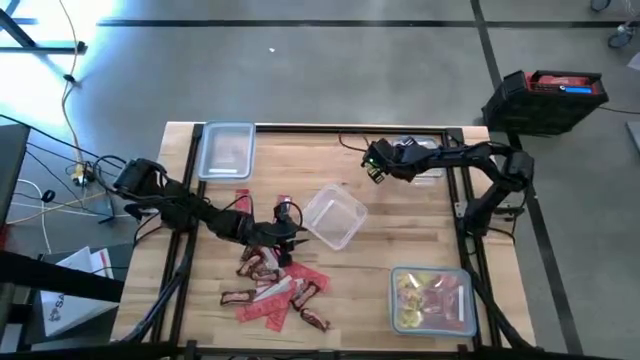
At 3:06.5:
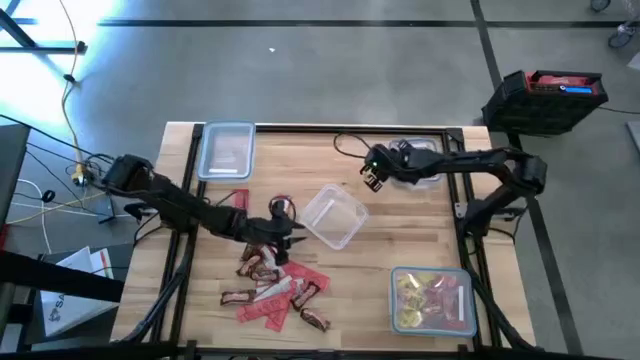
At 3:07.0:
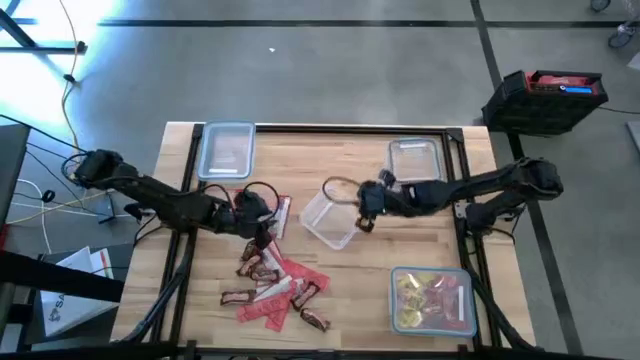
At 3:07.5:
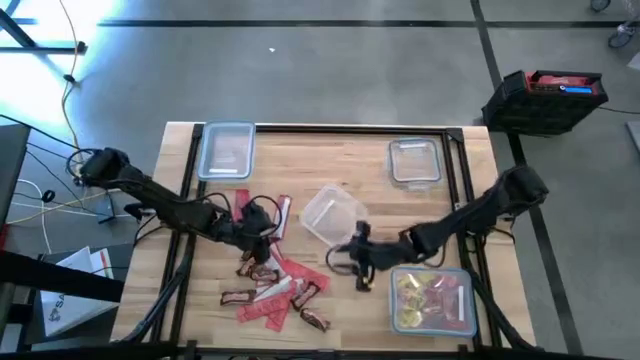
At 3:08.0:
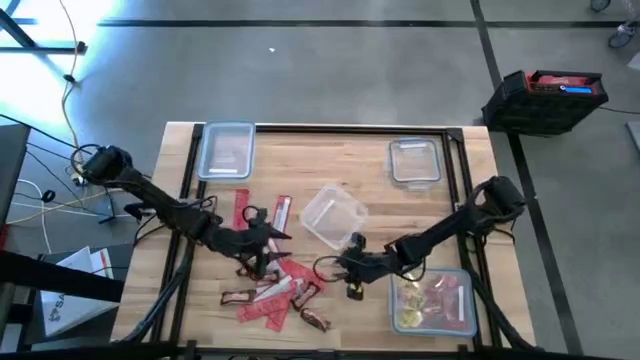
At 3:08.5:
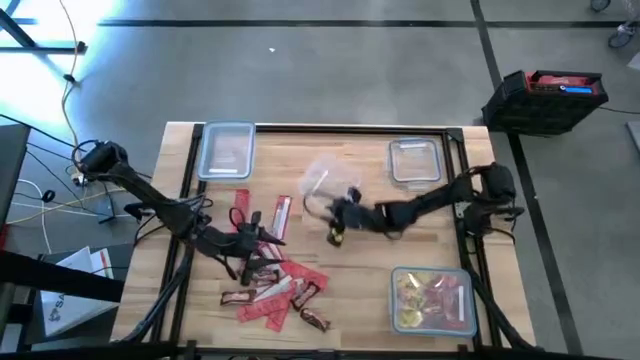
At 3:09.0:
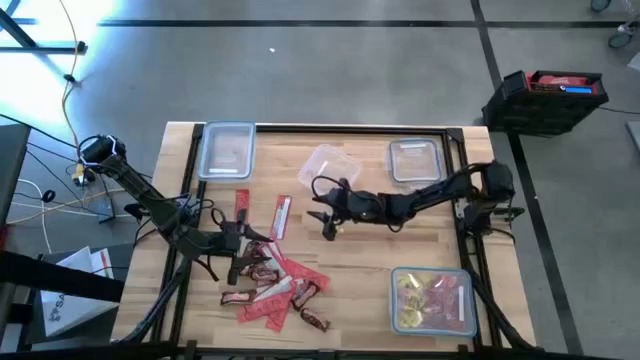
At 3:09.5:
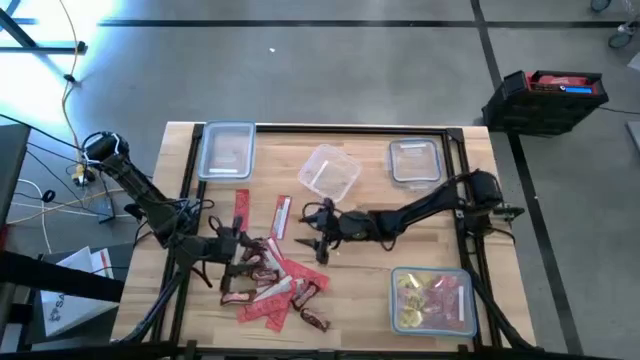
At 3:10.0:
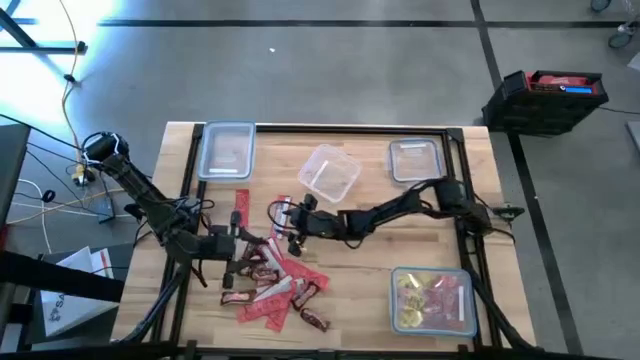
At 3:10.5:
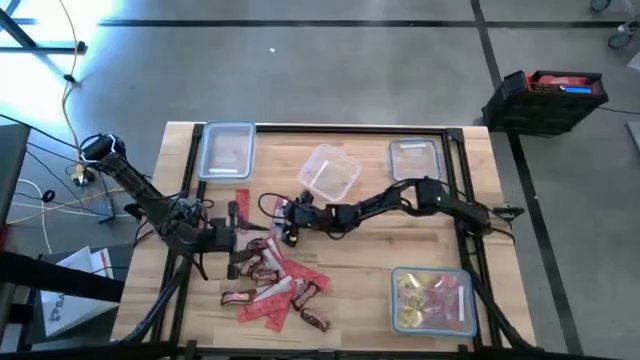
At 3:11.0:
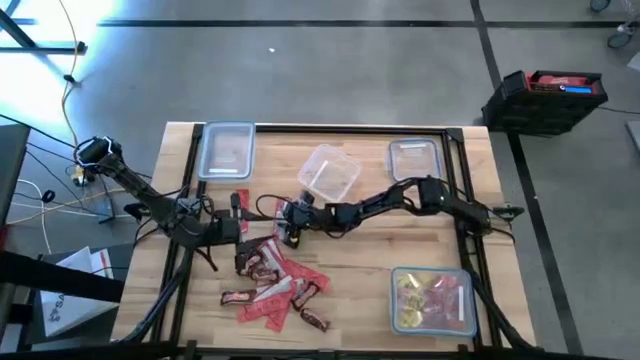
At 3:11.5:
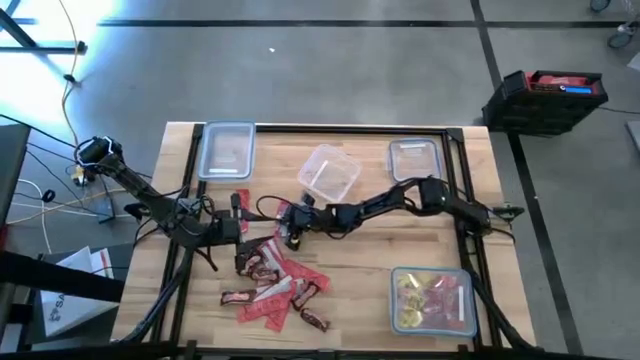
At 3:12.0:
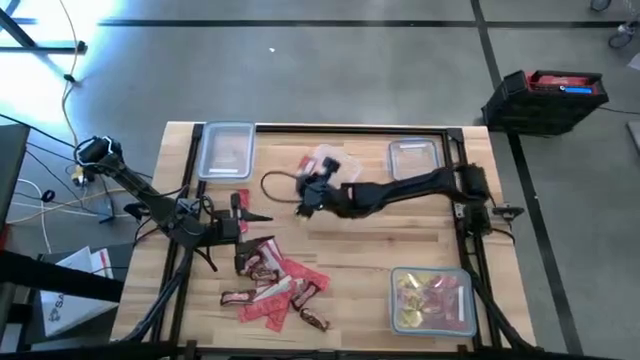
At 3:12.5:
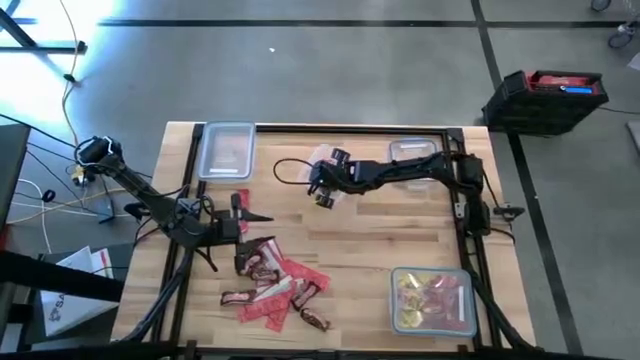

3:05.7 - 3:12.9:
Task: Sort candy
Put the strawberry red into the upper middle transparent bin

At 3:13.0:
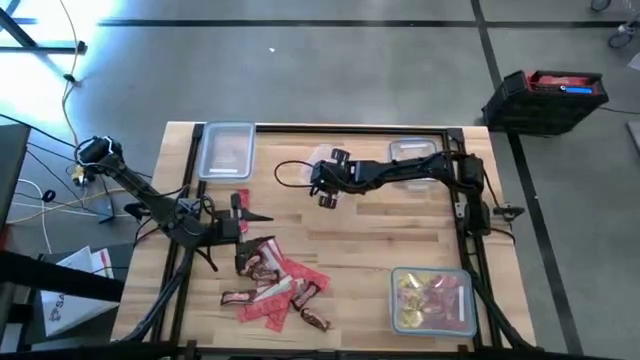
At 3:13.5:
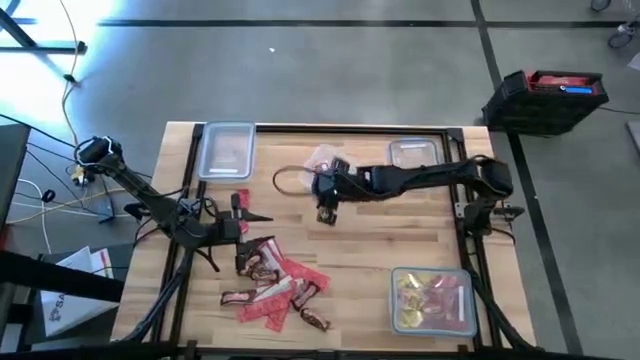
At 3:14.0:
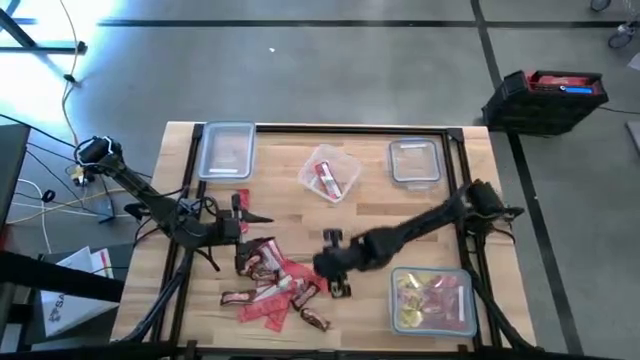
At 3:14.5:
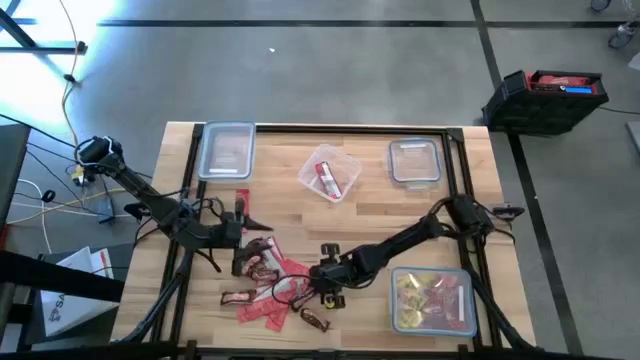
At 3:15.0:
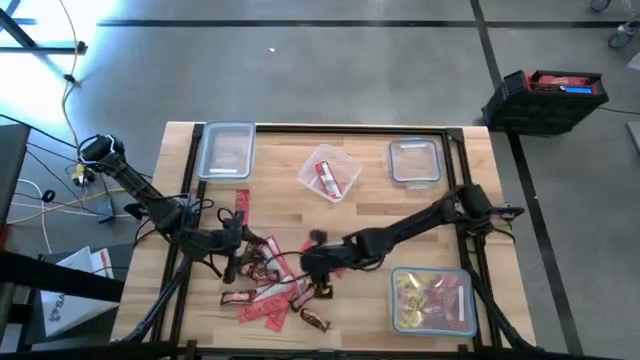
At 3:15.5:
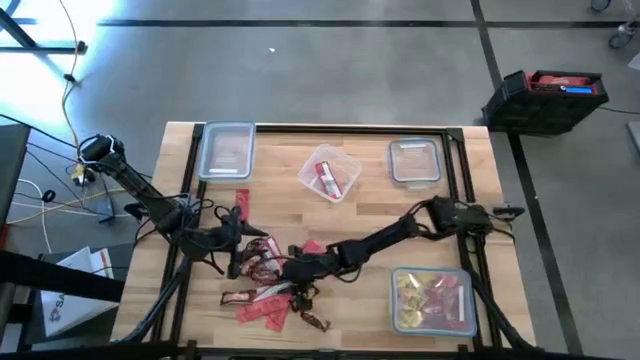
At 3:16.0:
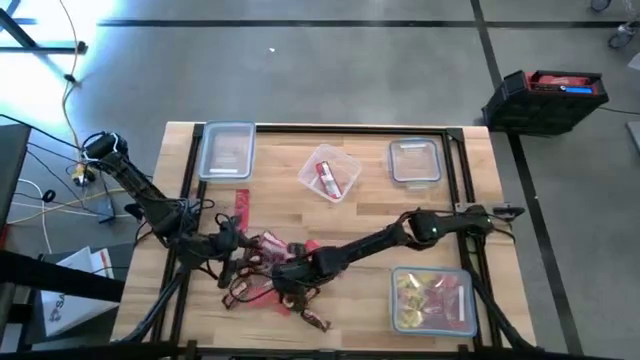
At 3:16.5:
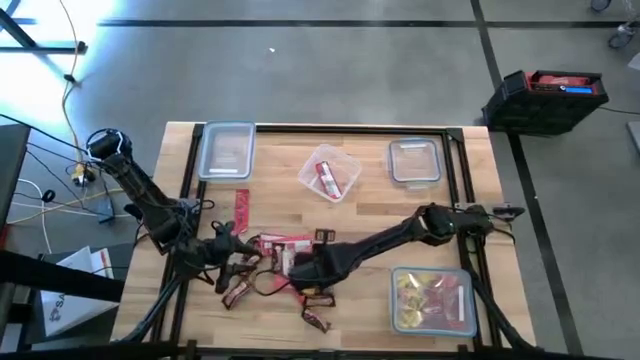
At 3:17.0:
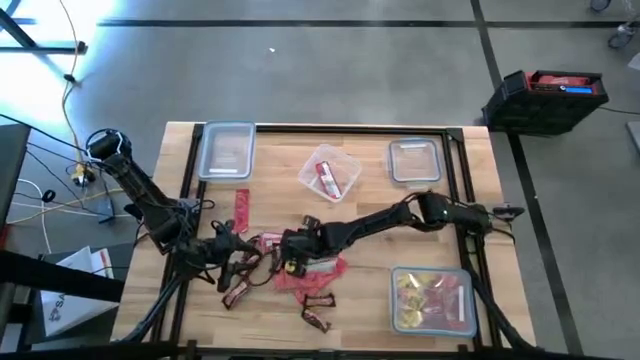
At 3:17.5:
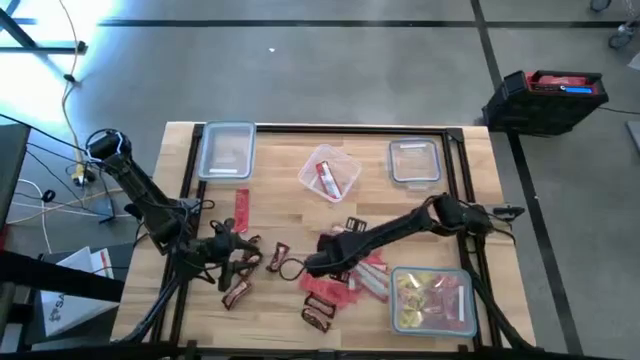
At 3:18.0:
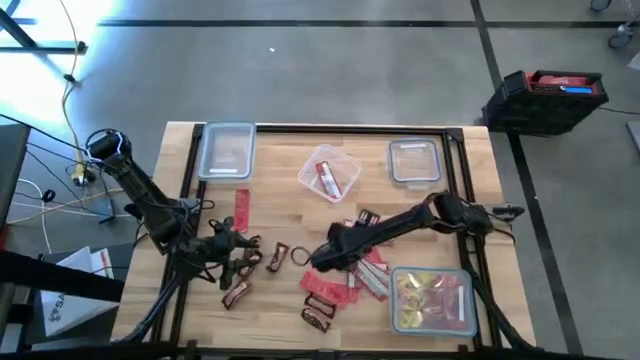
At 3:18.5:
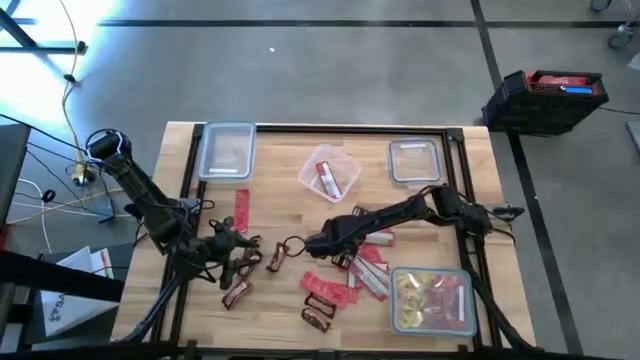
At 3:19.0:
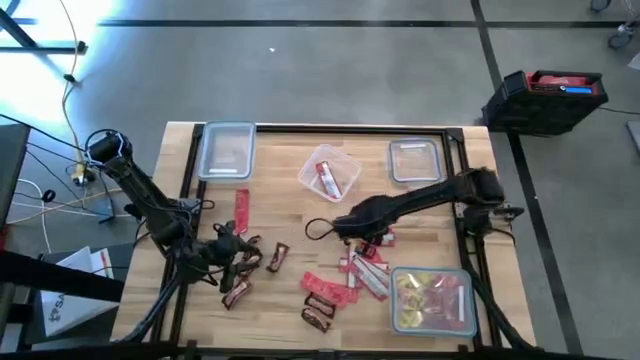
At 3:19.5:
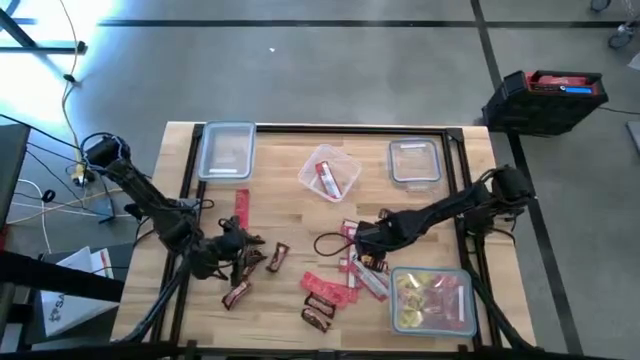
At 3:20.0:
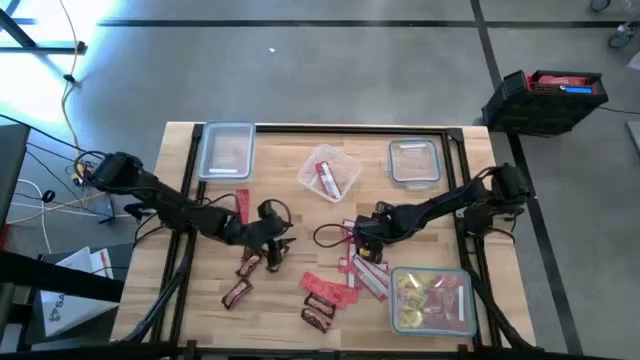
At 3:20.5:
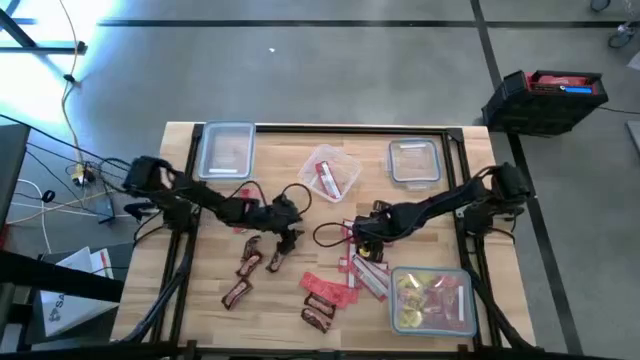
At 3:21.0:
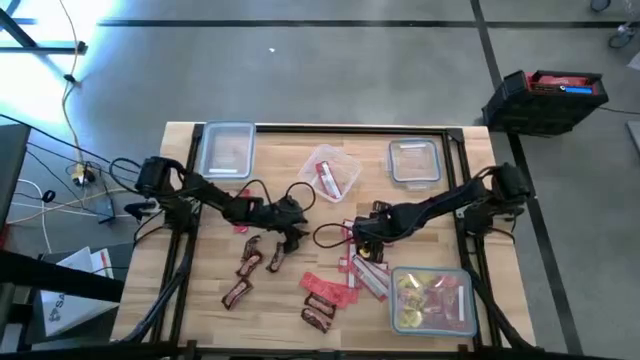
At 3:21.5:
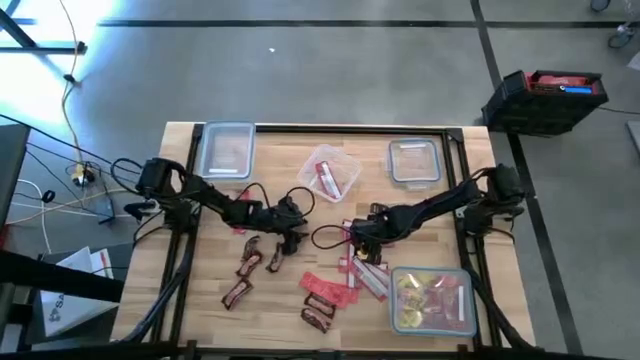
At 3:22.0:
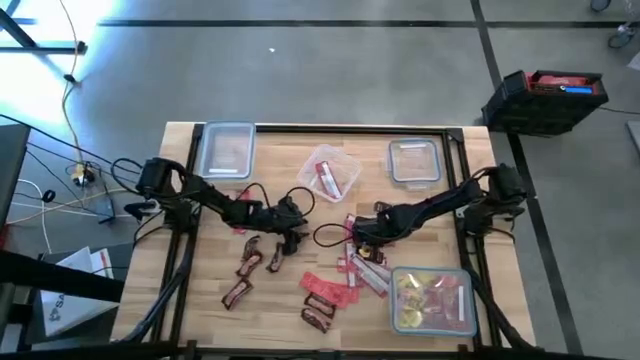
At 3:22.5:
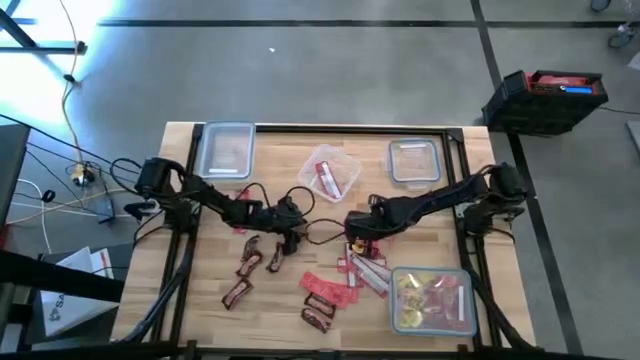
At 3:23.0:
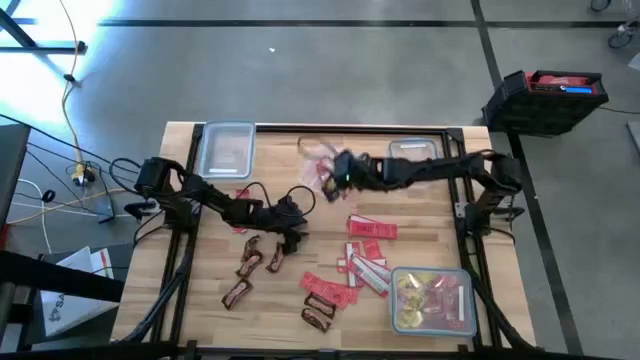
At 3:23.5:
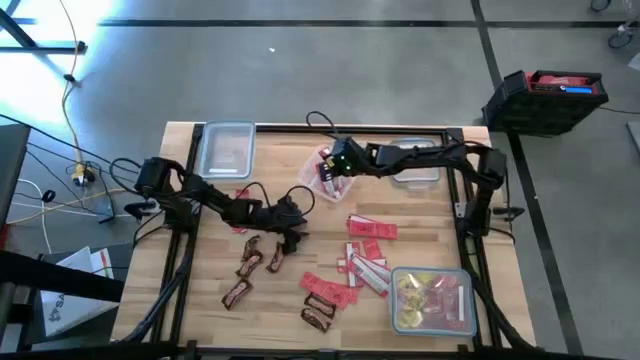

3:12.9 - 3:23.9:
Put the strawberry red into the upper middle transparent bin

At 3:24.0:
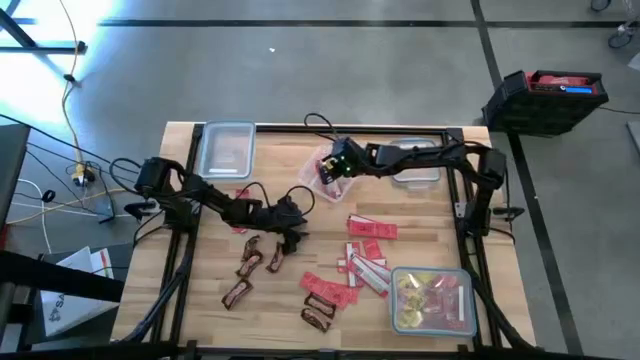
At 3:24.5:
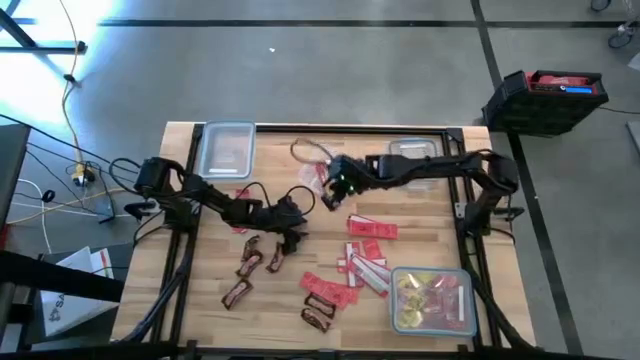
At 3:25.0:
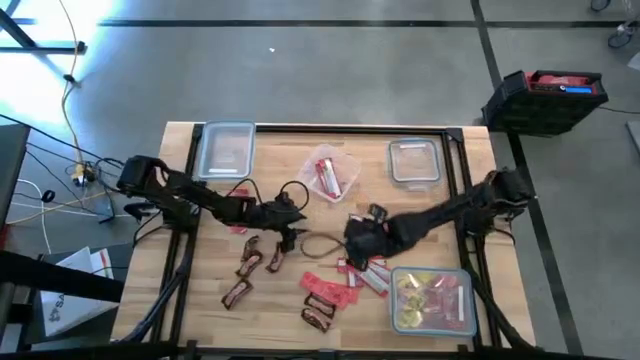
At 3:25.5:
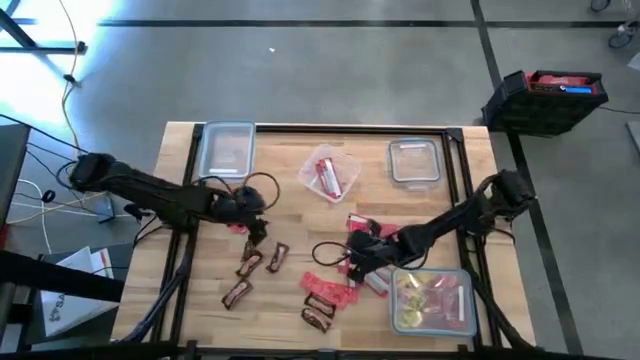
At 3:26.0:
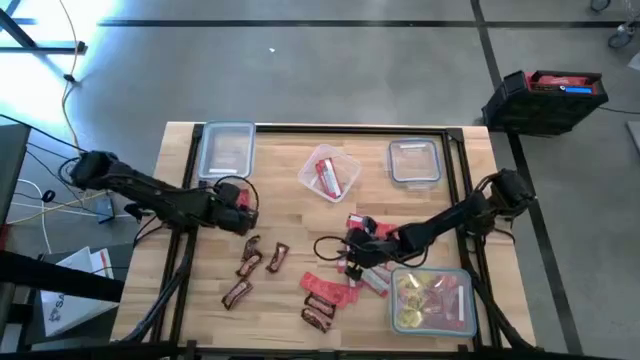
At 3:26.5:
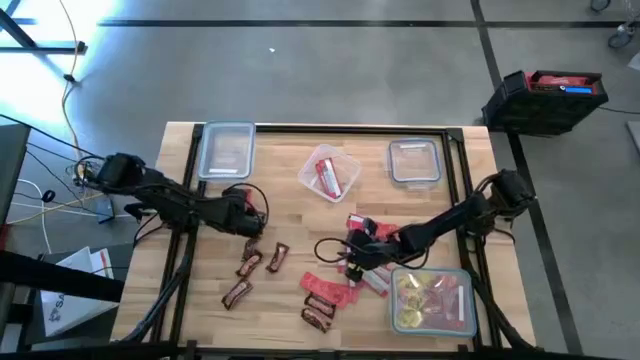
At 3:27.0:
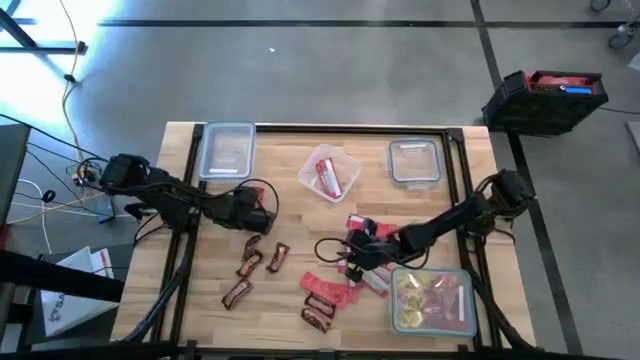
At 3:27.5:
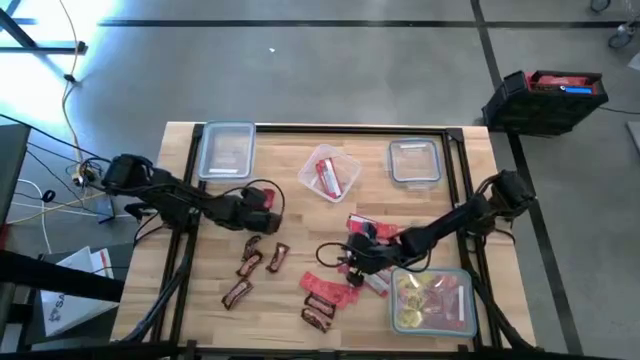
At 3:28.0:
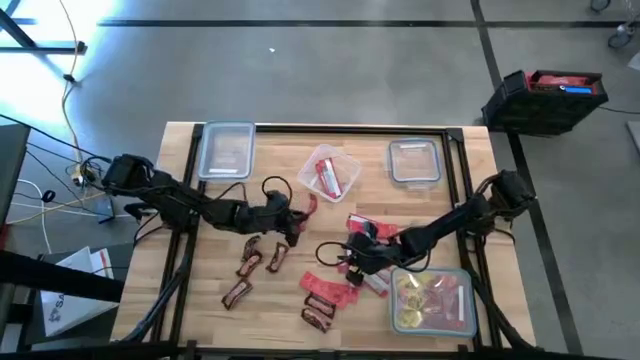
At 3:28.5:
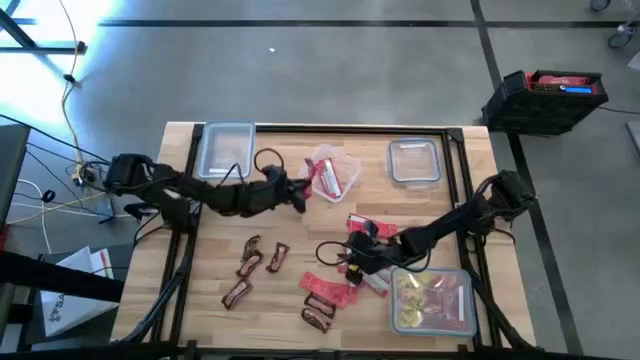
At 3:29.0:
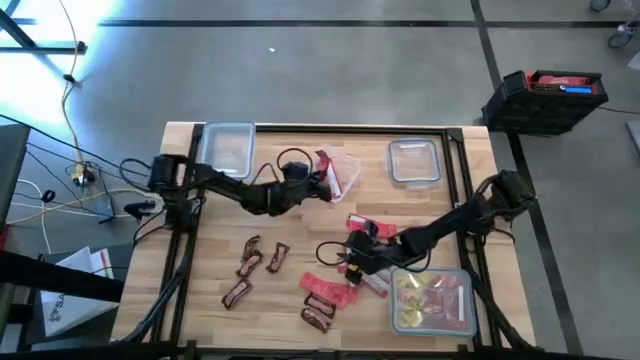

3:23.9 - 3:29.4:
Put the strawberry red into the upper middle transparent bin
